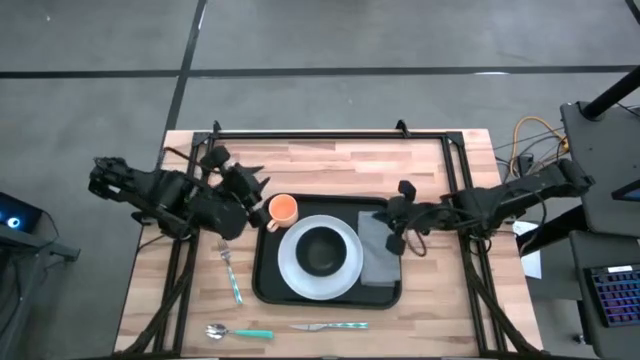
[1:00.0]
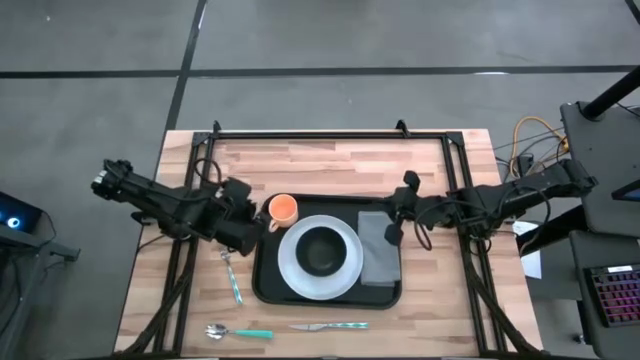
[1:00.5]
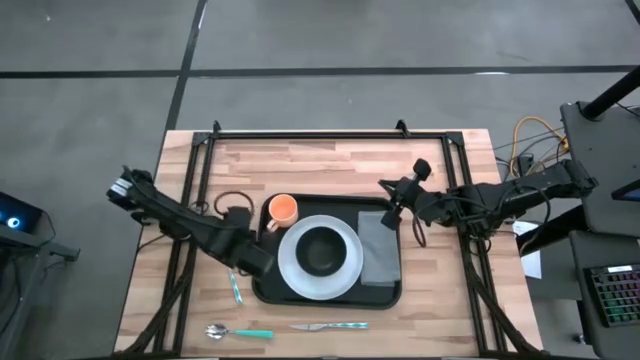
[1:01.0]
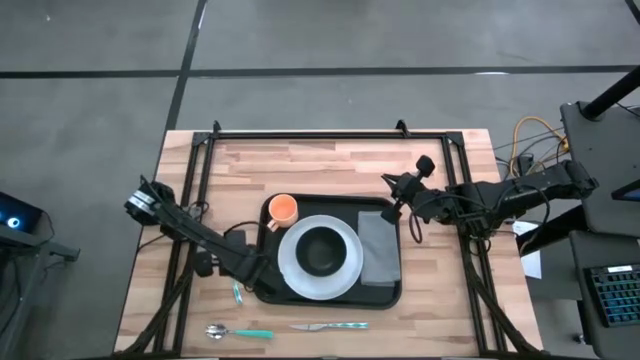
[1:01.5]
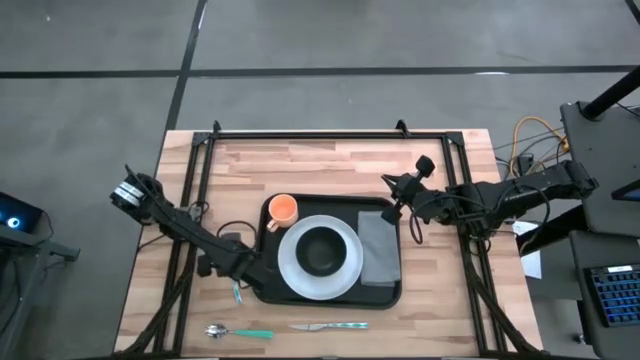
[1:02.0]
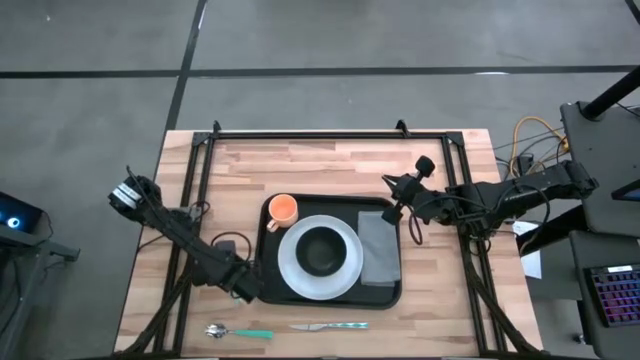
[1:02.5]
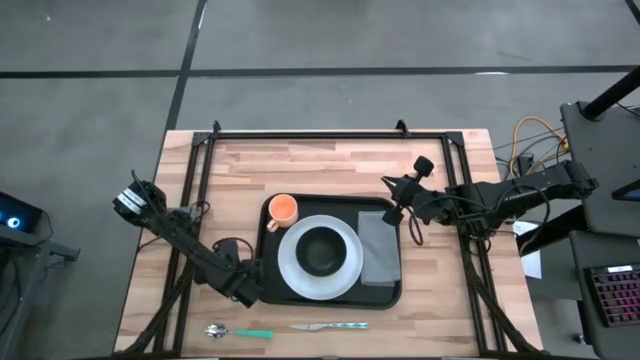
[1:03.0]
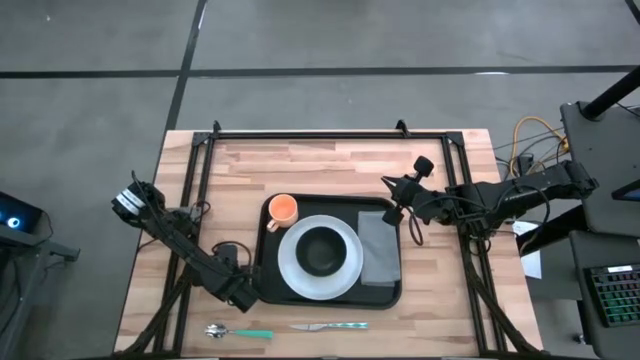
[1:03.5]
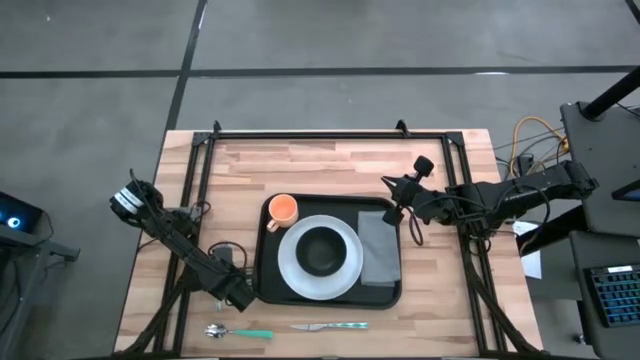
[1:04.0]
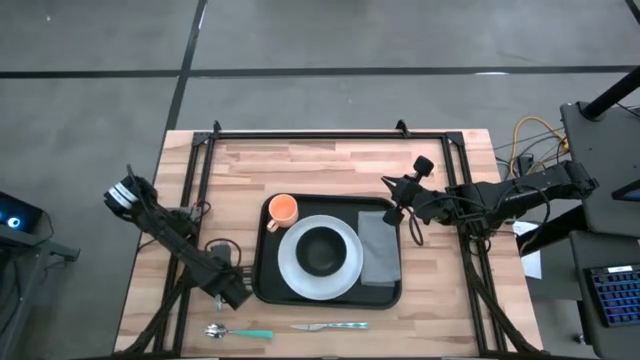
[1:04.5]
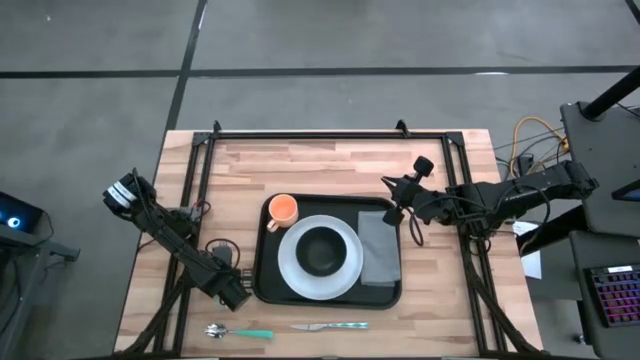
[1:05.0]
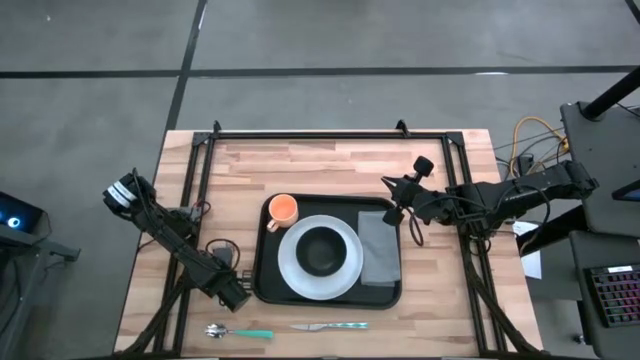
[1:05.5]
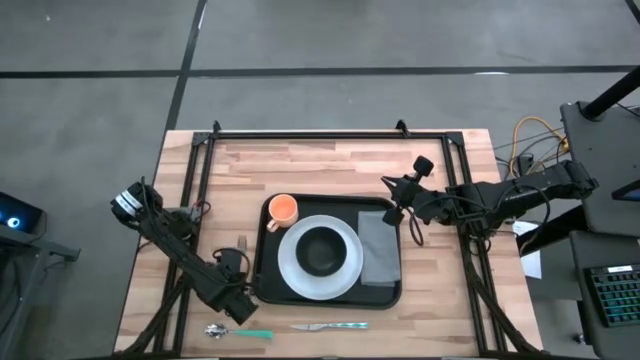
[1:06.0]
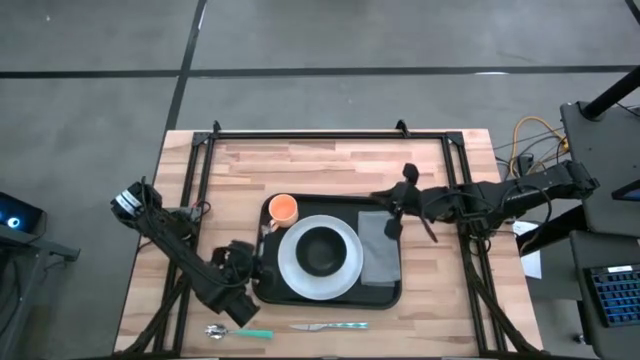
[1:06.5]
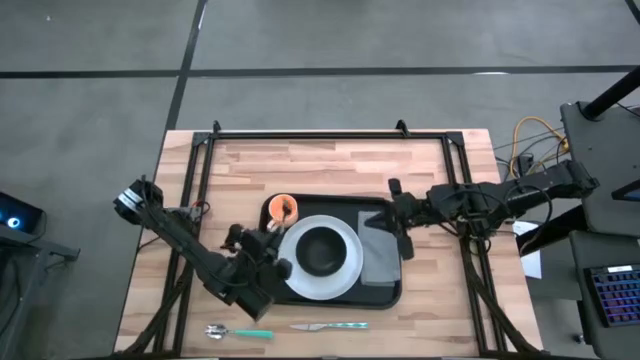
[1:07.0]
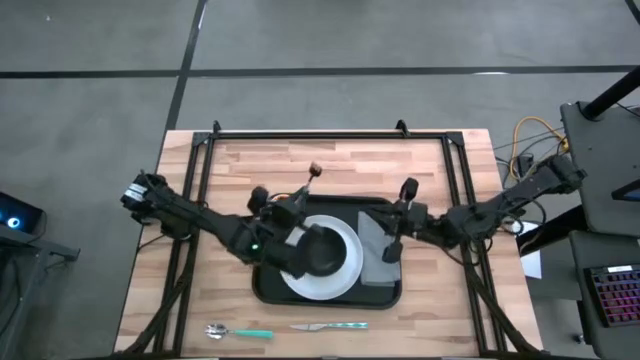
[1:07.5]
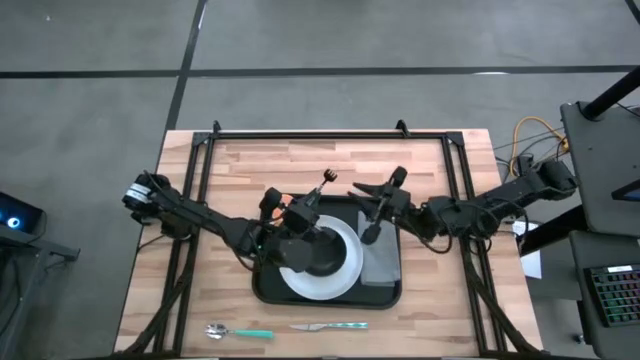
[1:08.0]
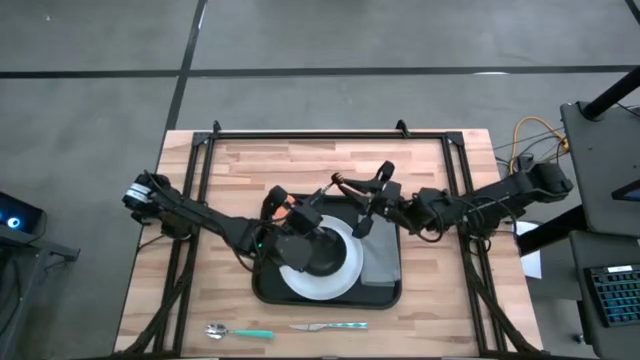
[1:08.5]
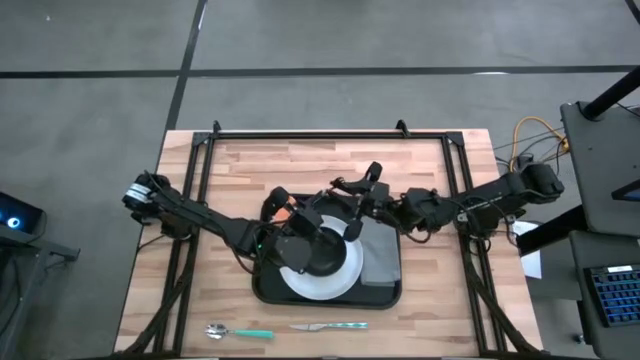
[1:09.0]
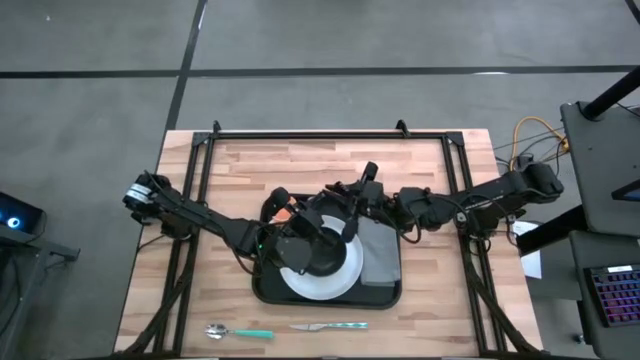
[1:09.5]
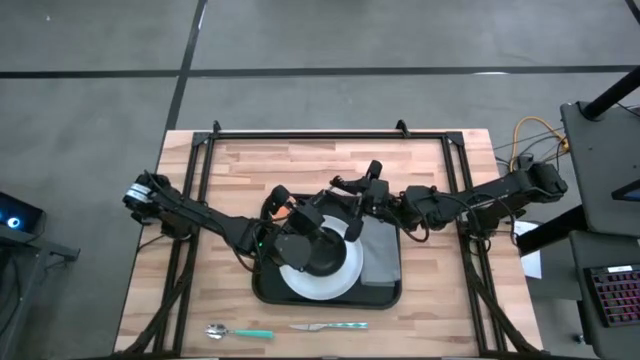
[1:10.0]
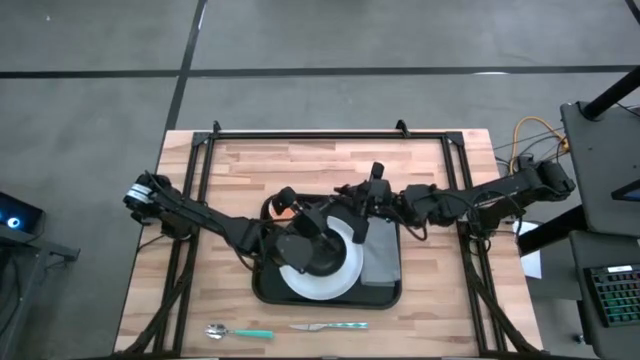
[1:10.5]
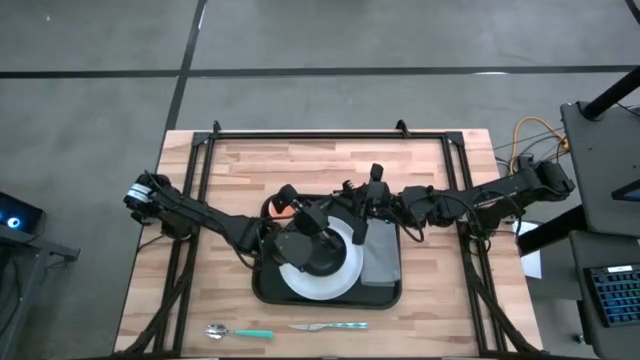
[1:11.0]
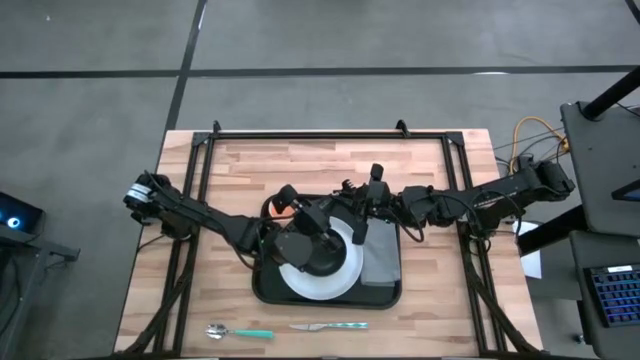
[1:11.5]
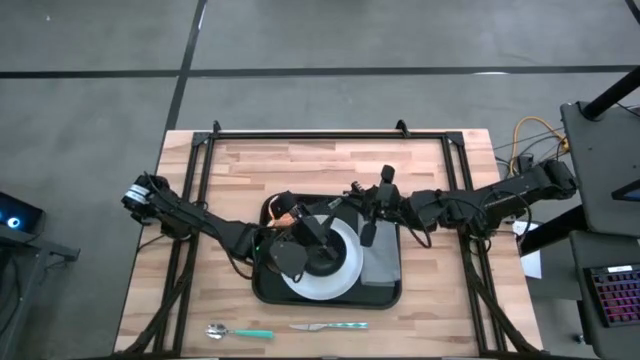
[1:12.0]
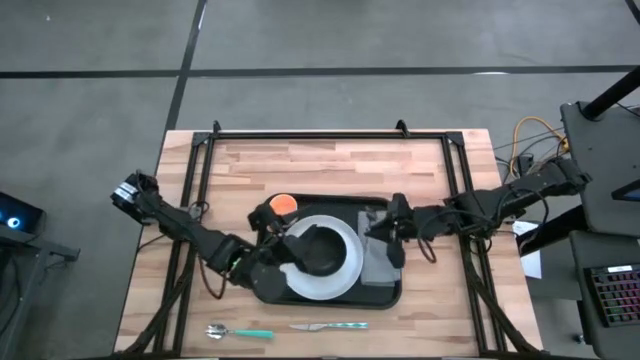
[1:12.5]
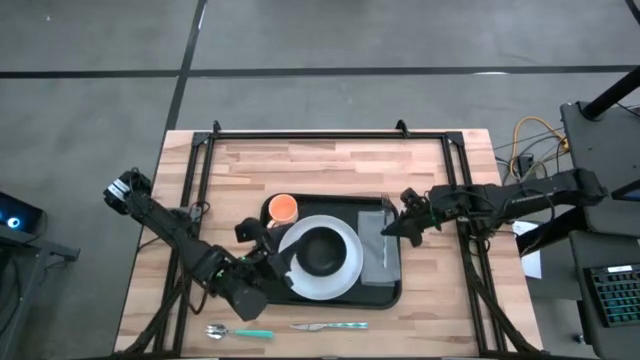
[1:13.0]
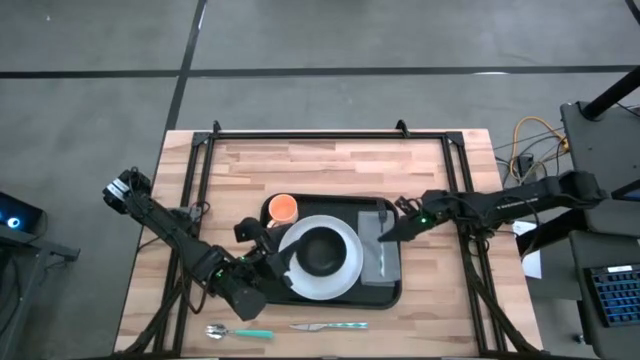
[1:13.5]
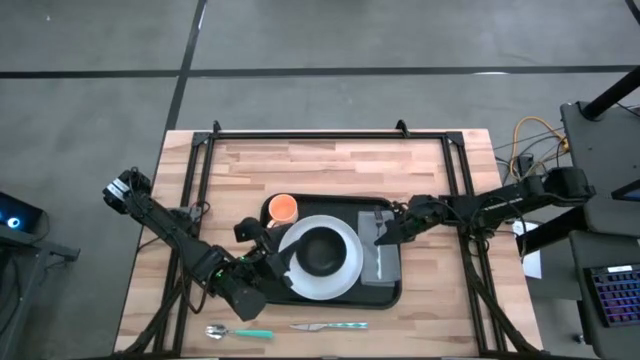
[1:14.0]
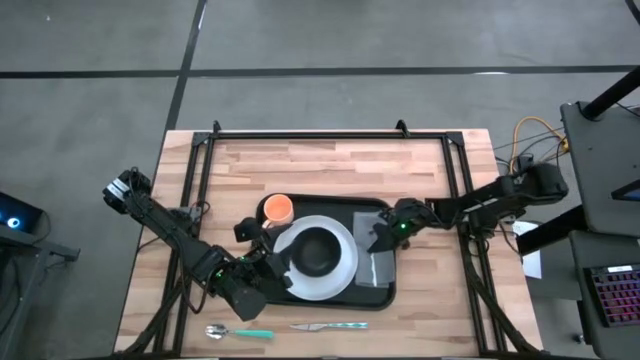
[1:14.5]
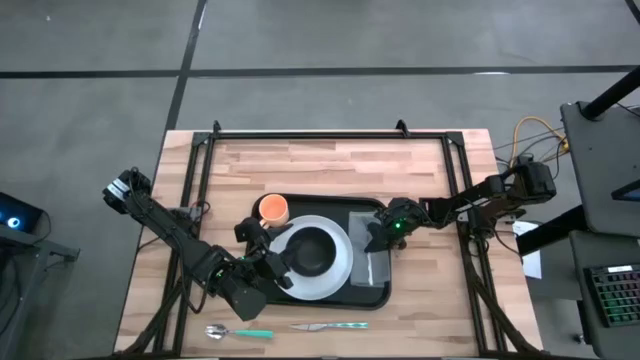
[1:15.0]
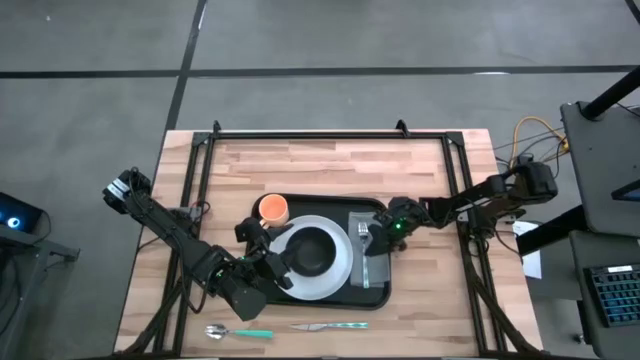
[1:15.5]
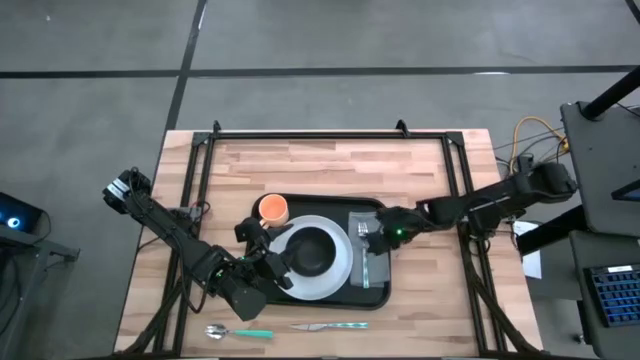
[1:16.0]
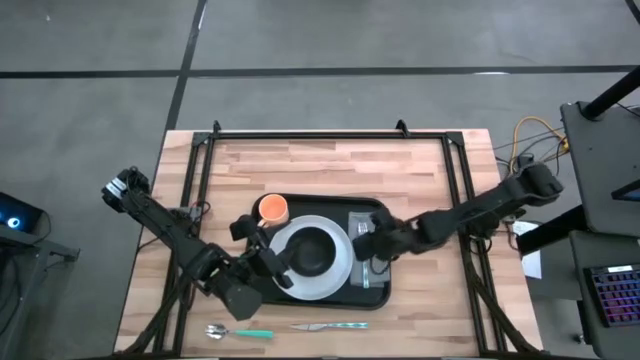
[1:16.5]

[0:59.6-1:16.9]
Task: Set up tray
Put the blue fork on top of the gray napkin
